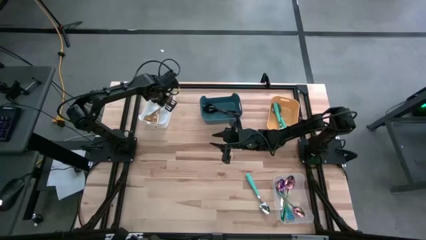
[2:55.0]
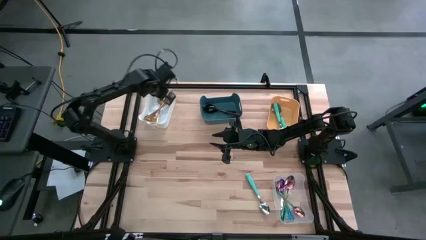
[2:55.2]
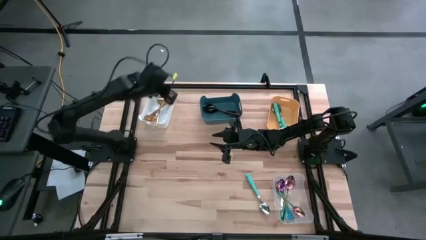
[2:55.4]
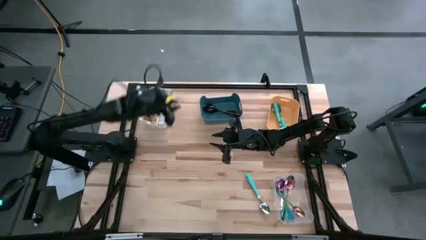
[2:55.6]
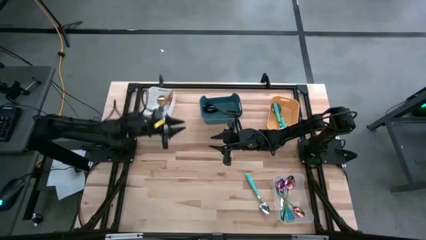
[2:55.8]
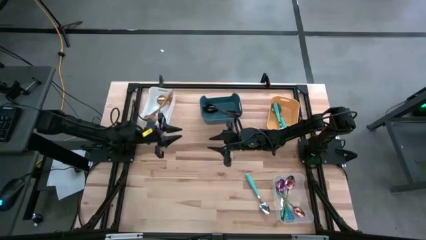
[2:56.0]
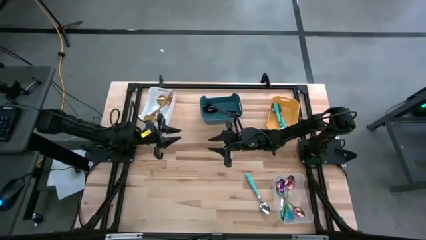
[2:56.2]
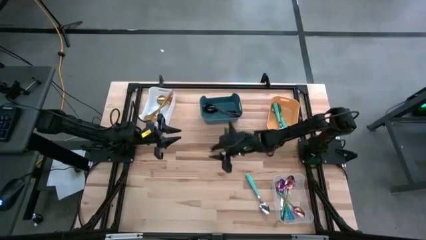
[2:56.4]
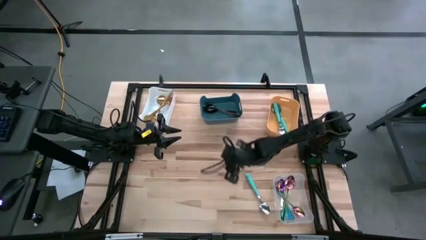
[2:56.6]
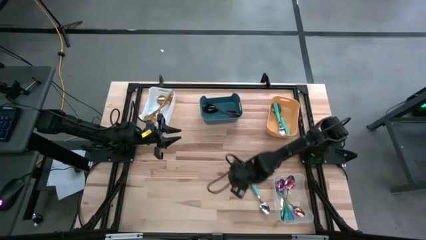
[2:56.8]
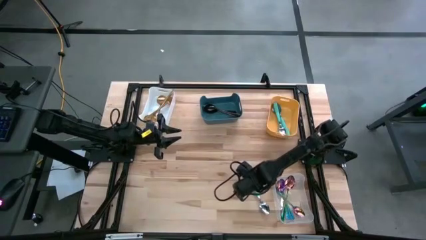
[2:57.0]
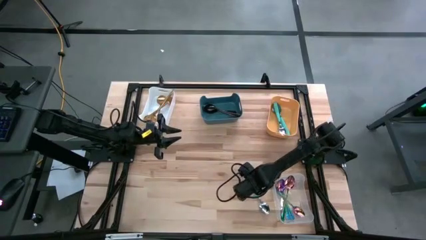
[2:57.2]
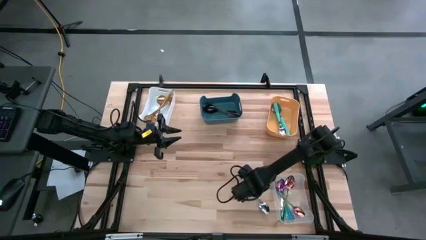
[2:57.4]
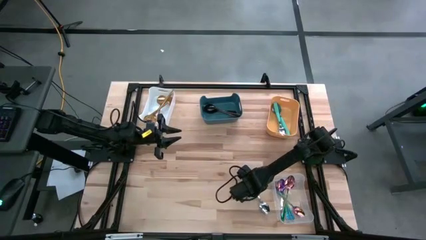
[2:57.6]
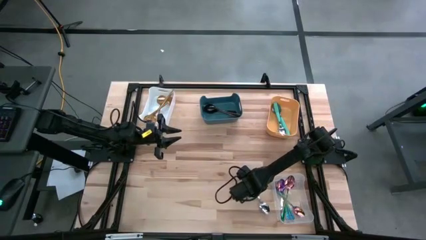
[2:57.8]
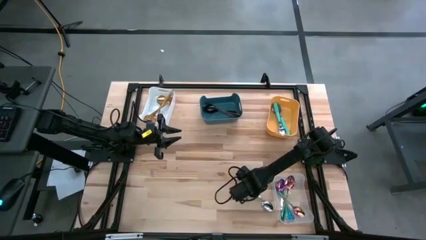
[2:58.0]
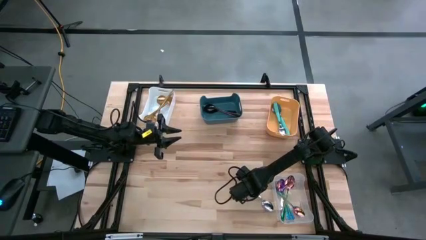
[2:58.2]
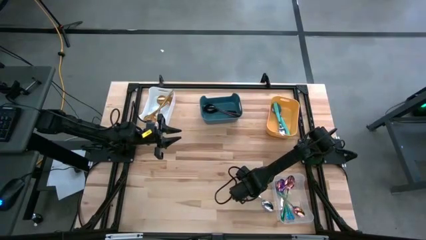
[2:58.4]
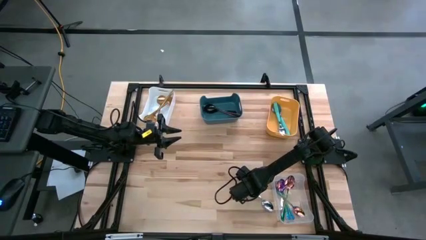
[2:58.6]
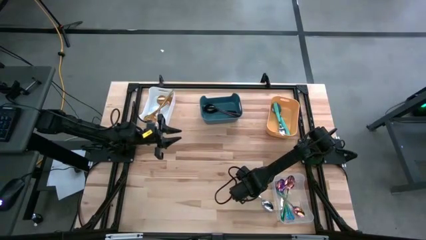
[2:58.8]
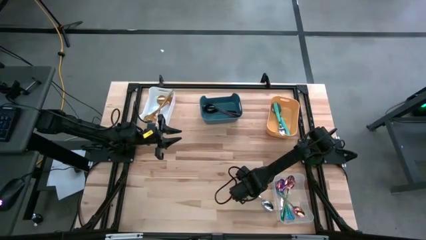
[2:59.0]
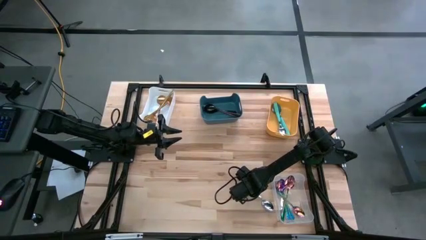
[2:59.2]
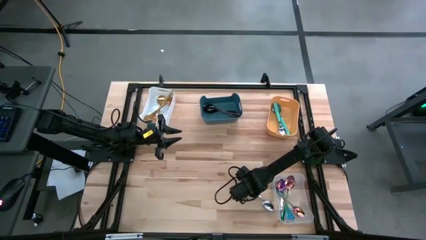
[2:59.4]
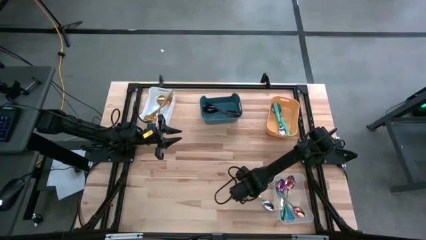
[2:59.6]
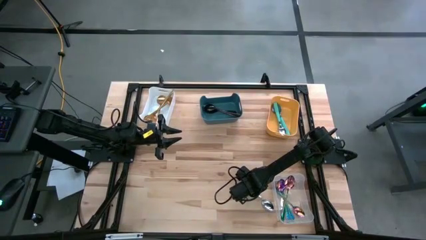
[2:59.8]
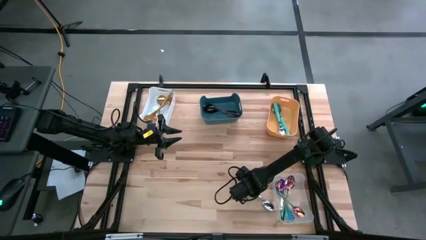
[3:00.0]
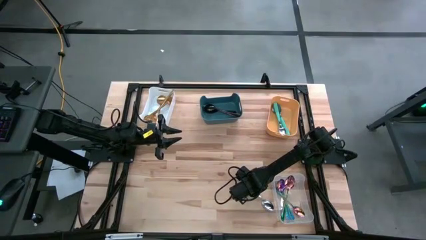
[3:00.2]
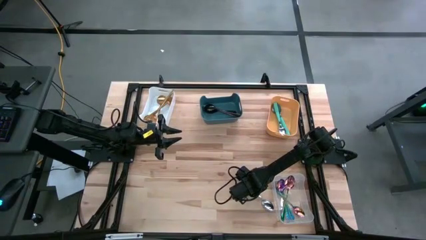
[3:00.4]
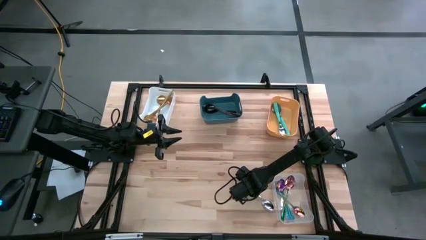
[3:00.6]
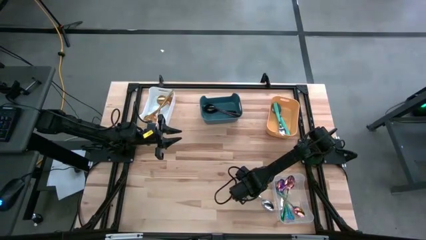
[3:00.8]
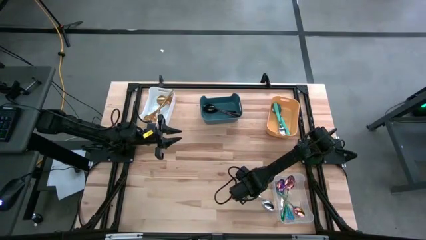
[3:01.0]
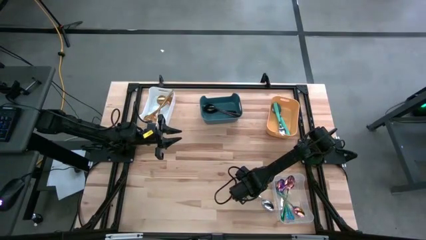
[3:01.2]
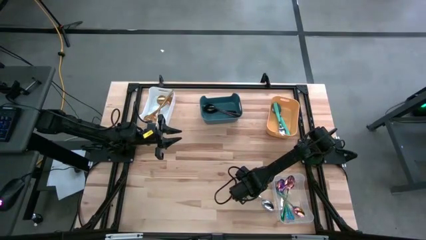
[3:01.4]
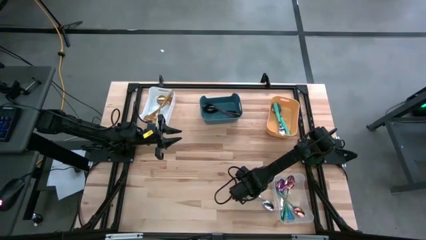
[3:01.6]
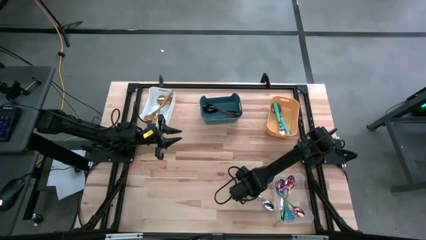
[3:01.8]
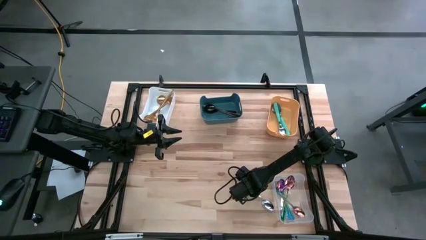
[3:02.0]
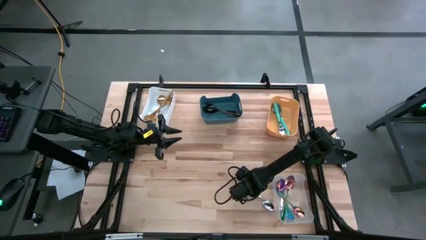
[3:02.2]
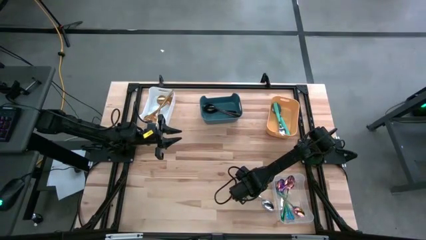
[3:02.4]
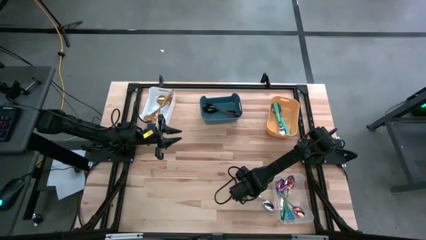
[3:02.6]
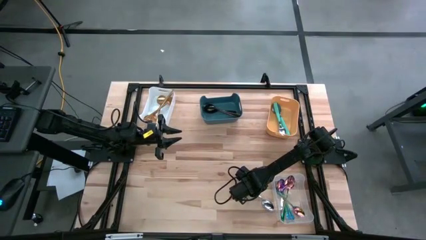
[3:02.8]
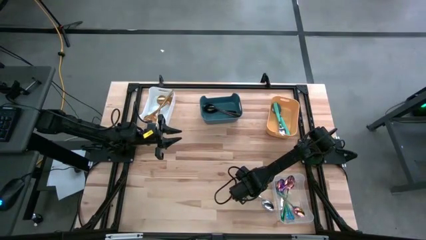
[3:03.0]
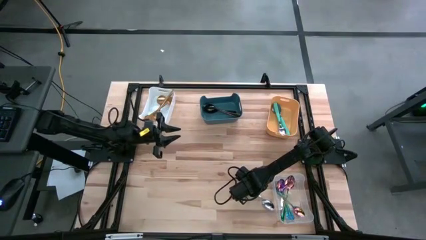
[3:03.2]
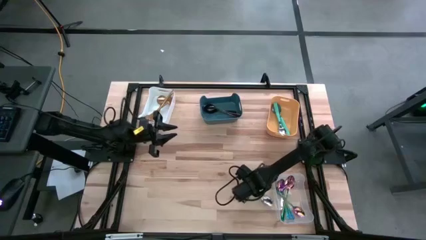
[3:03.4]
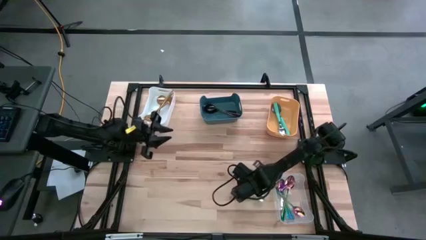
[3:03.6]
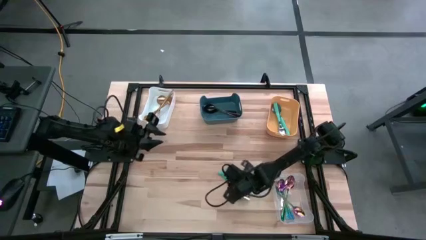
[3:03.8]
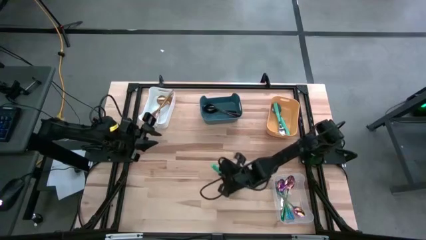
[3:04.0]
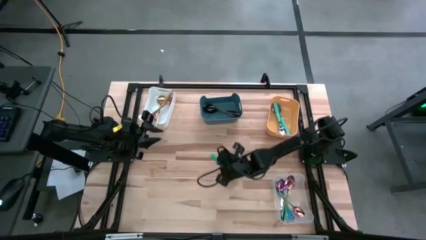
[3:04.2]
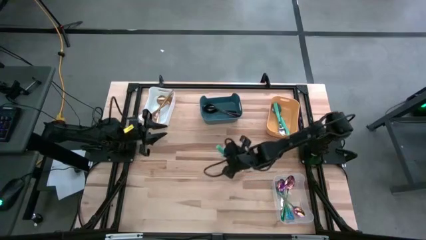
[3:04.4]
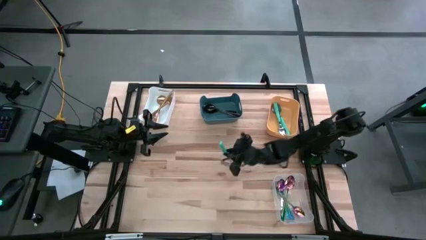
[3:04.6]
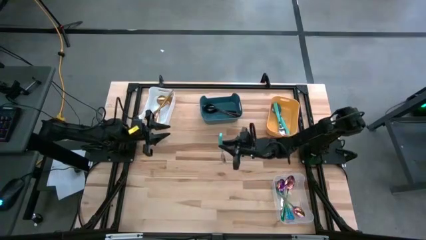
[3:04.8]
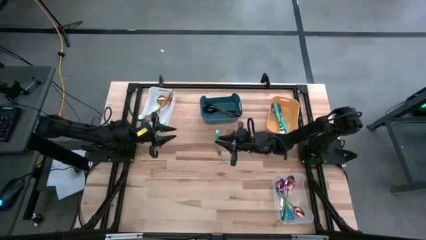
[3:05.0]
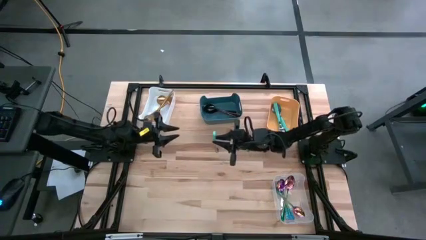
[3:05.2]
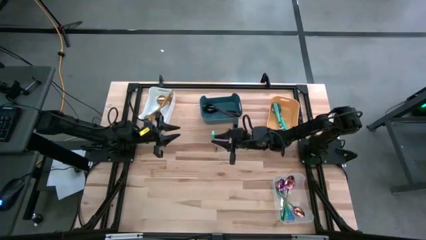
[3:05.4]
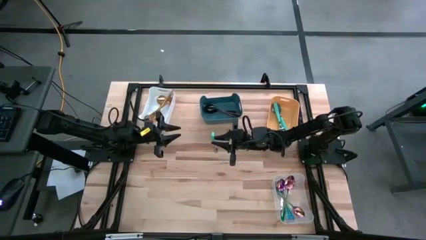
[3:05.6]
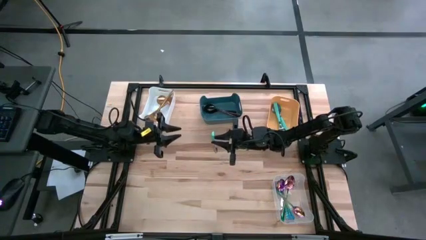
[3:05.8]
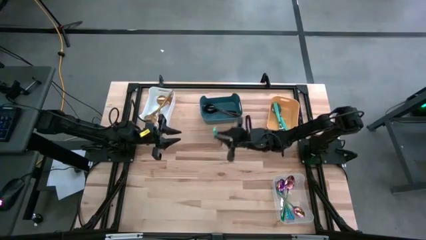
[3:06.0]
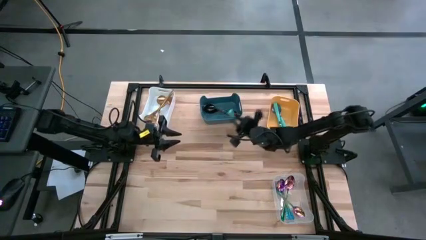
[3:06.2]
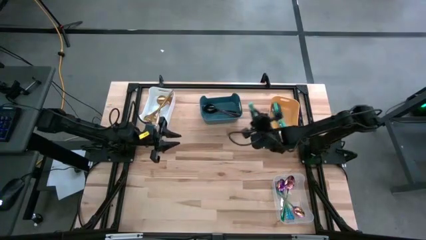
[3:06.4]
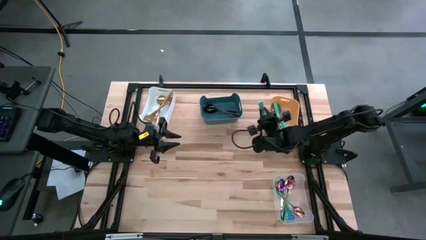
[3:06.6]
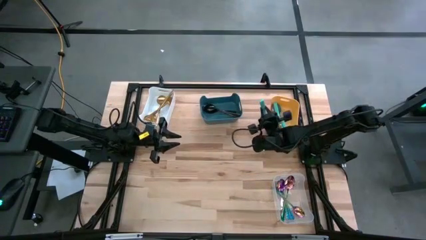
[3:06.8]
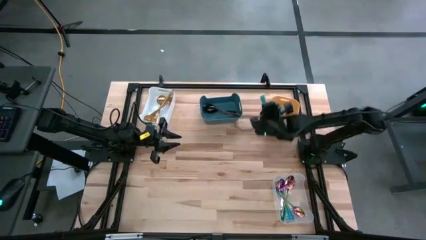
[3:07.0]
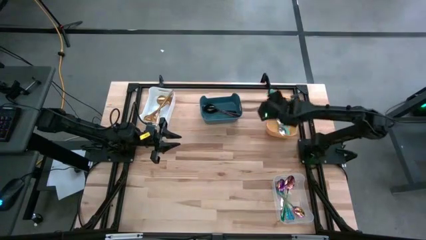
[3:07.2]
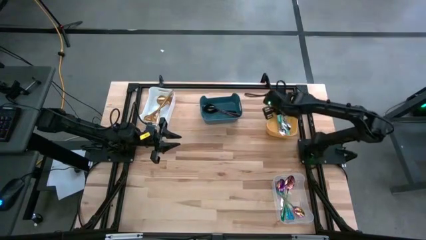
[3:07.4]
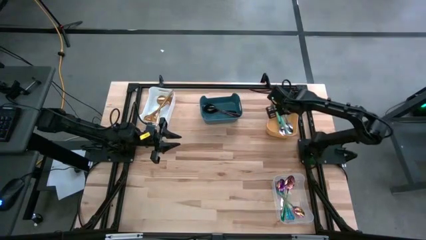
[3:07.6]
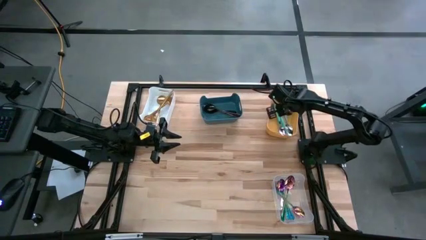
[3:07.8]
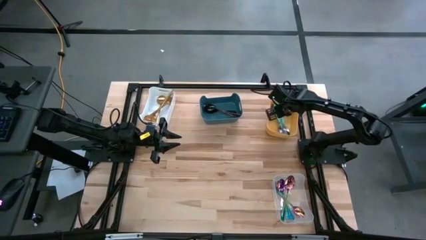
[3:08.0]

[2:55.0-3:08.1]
Task: Sort silverware by color (type)
Put the light green spoon into the orange bin
